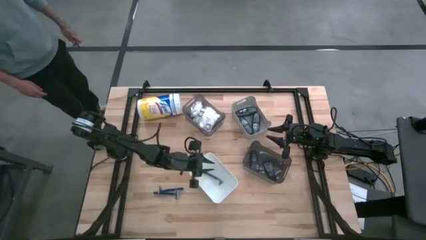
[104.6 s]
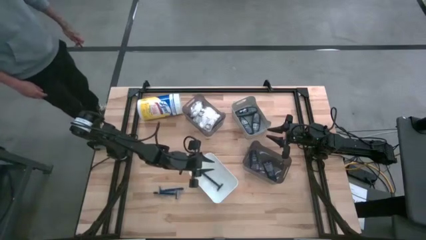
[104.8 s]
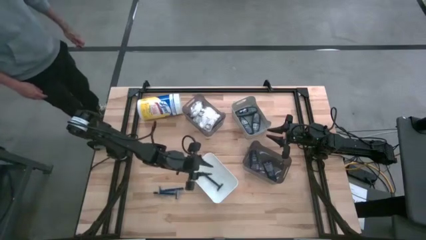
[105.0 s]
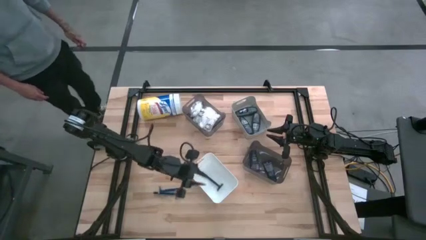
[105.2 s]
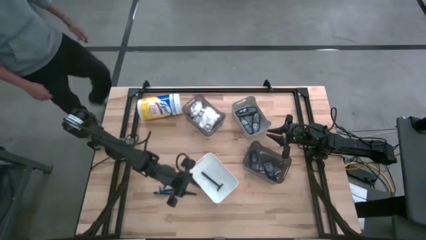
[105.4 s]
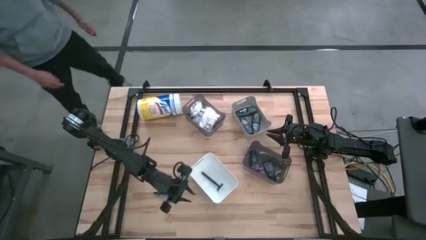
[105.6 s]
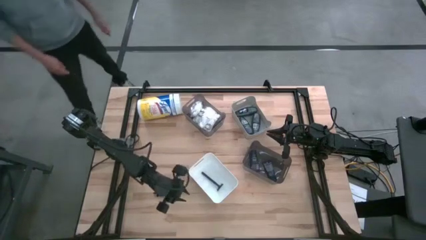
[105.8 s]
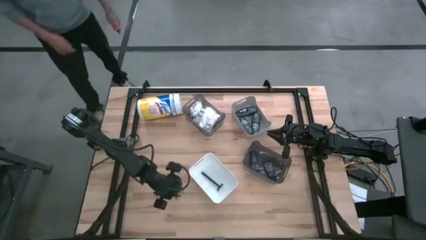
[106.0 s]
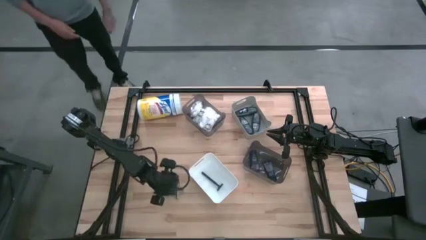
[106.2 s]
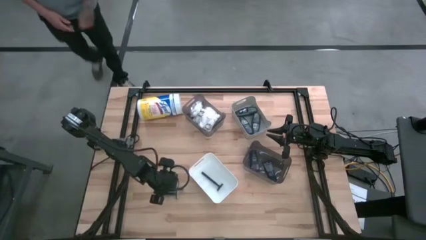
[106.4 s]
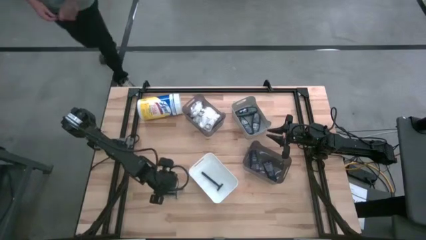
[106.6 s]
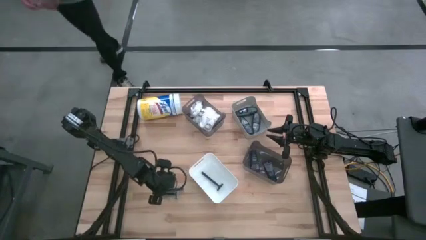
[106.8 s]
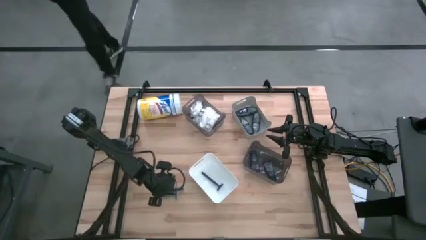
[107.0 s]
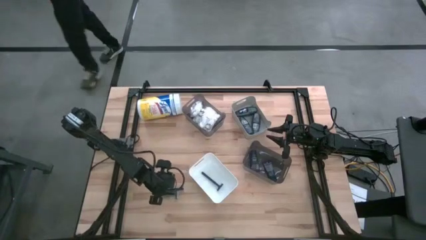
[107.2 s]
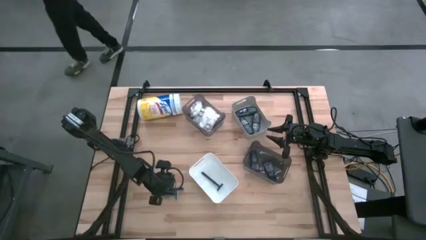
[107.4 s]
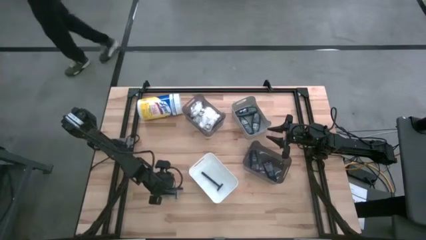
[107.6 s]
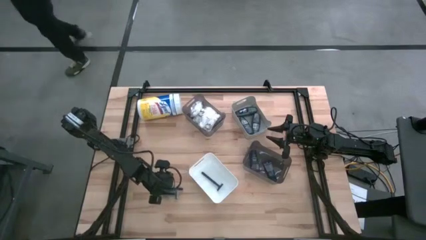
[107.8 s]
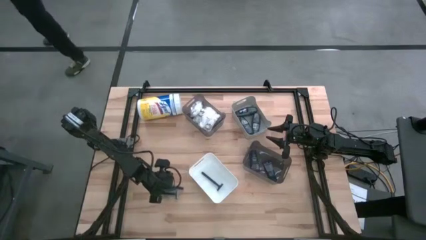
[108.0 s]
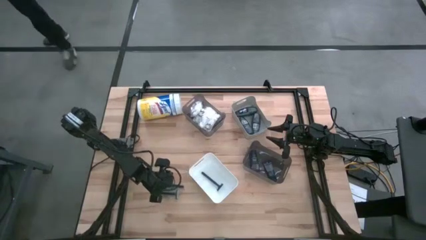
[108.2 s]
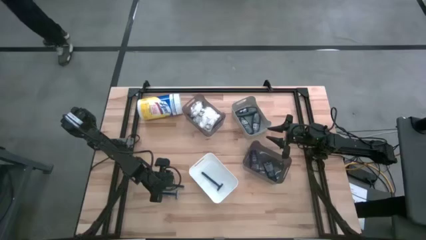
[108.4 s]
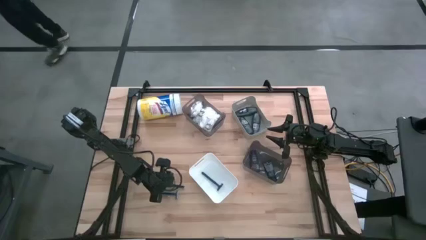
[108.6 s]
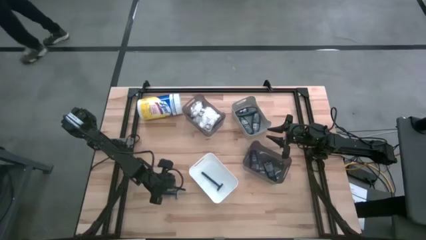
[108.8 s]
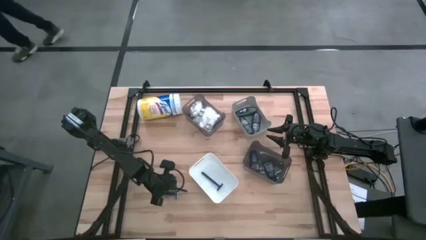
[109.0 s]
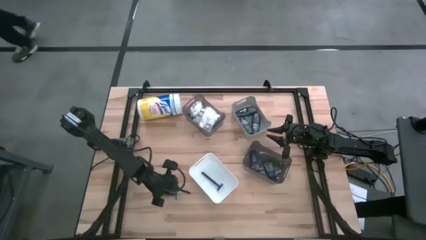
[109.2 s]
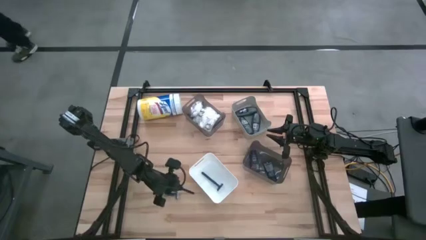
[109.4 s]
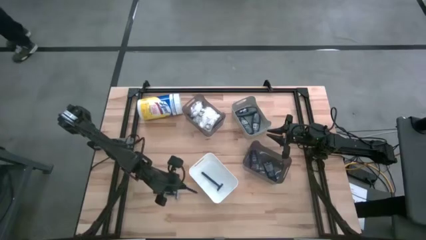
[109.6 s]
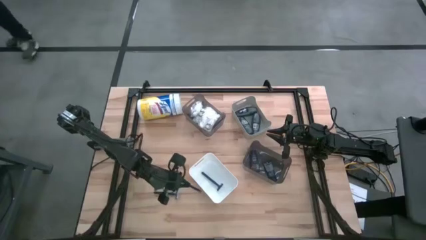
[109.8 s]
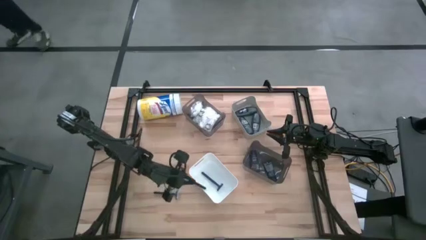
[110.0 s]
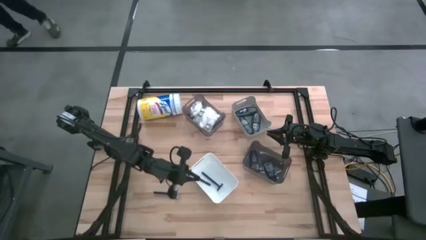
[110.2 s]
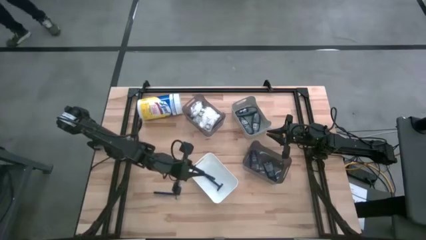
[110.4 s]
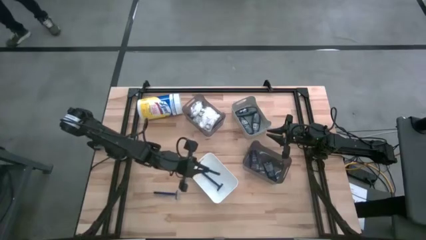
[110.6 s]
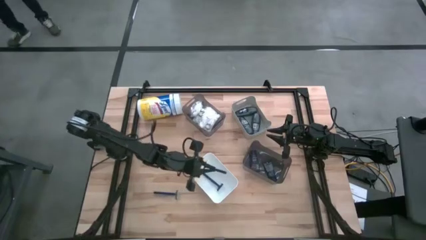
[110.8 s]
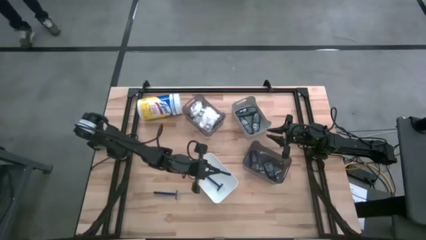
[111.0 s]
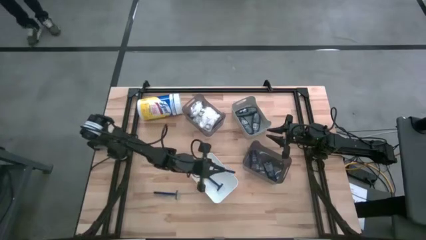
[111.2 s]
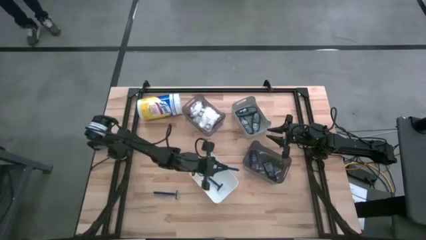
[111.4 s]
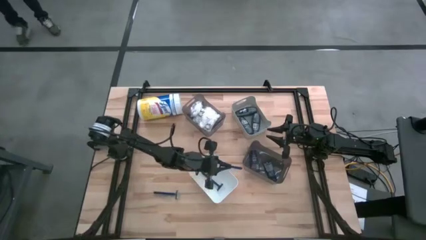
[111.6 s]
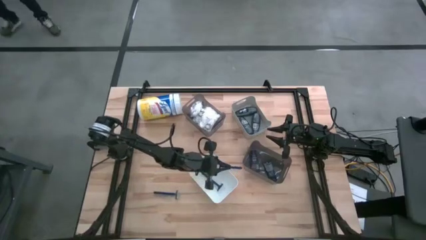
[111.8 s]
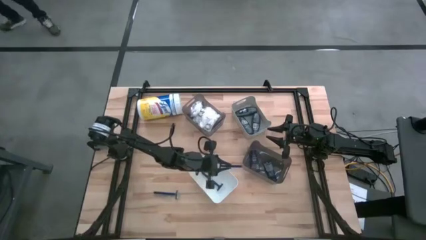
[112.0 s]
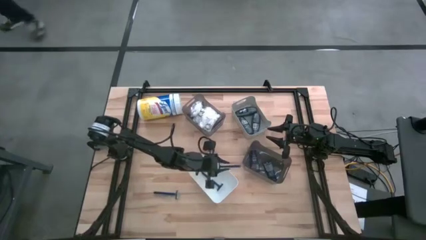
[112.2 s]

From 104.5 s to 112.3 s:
Task: Pick & Place Travel size toiletries
Put the blue razor into the white bin

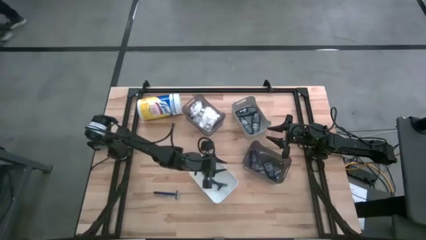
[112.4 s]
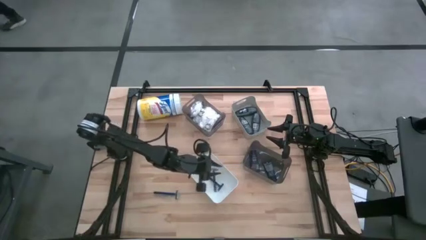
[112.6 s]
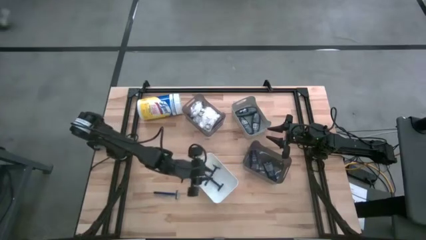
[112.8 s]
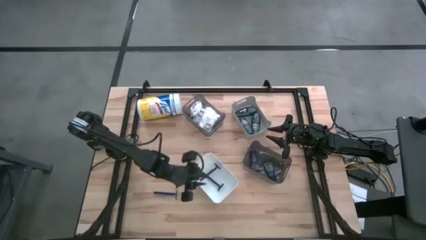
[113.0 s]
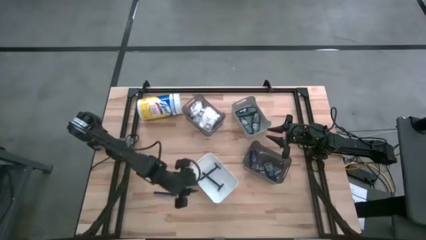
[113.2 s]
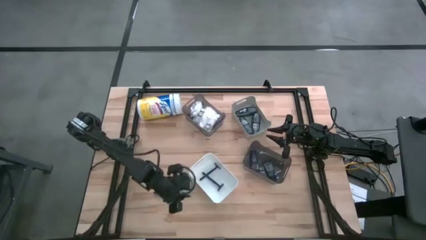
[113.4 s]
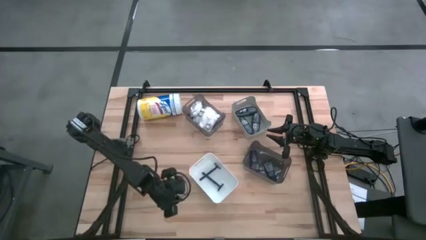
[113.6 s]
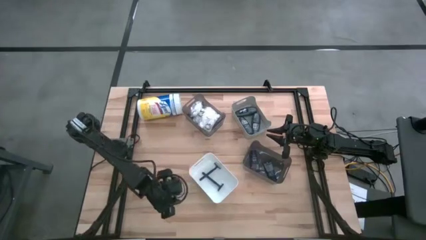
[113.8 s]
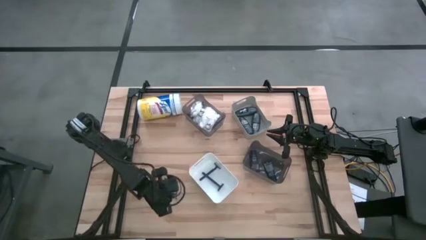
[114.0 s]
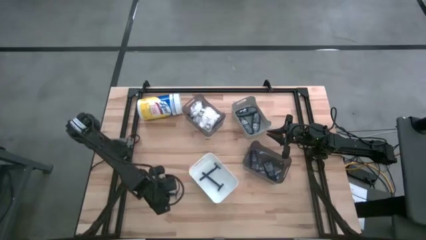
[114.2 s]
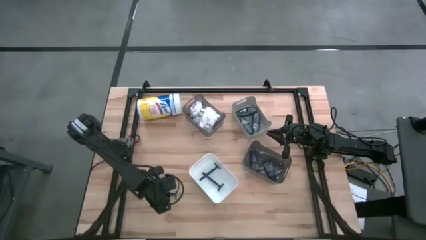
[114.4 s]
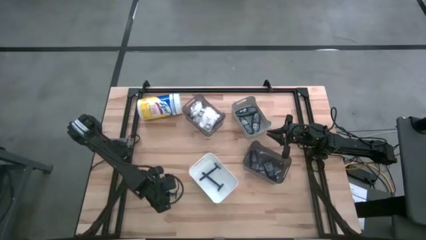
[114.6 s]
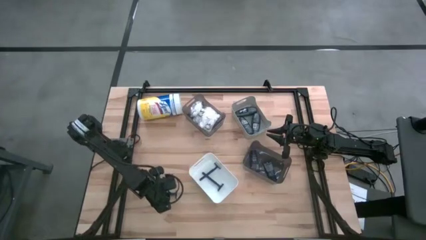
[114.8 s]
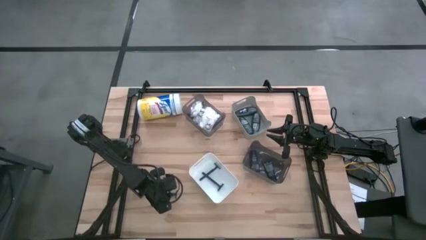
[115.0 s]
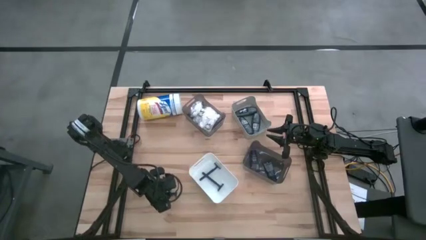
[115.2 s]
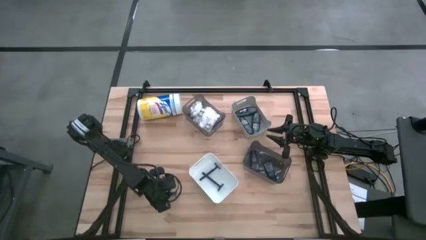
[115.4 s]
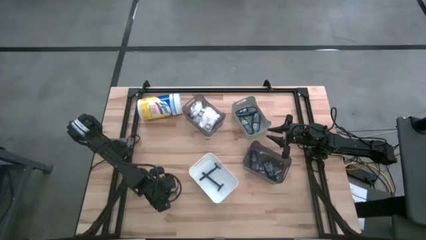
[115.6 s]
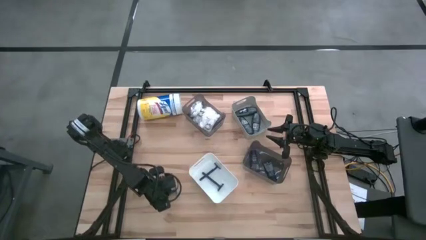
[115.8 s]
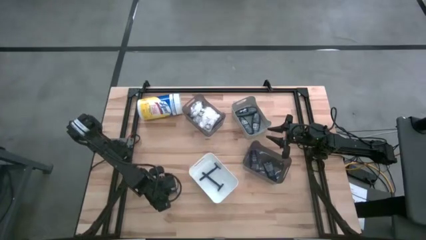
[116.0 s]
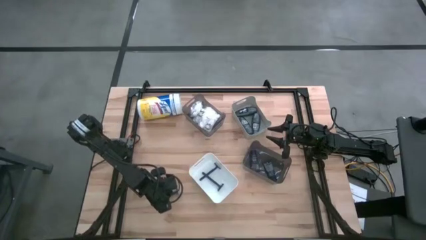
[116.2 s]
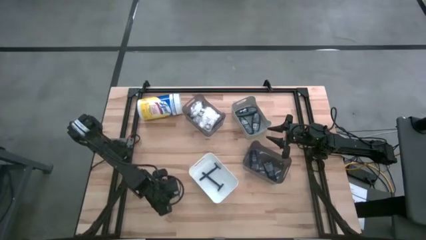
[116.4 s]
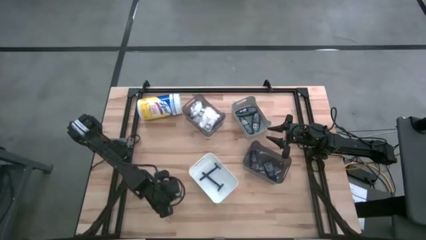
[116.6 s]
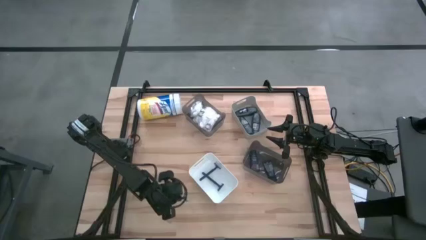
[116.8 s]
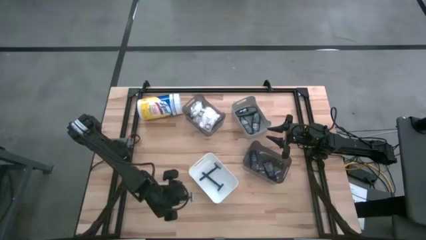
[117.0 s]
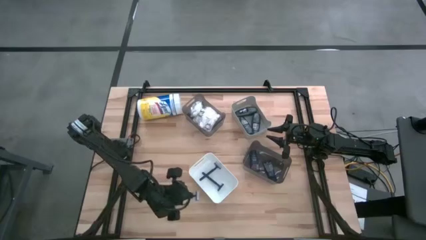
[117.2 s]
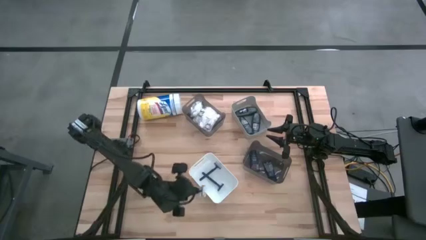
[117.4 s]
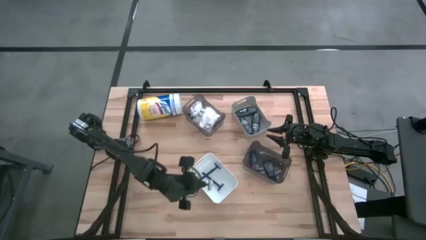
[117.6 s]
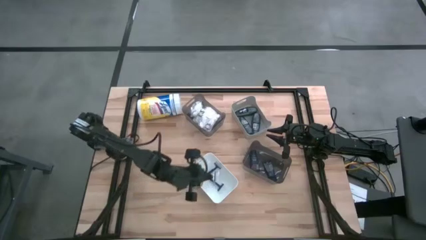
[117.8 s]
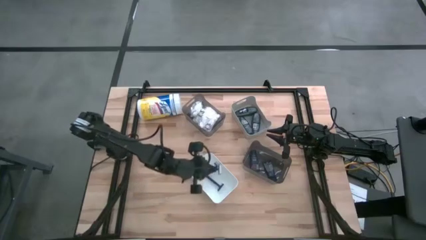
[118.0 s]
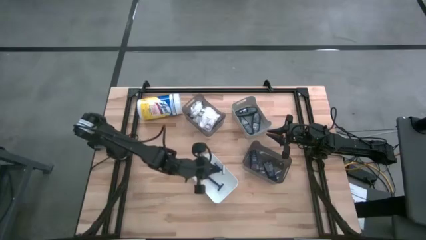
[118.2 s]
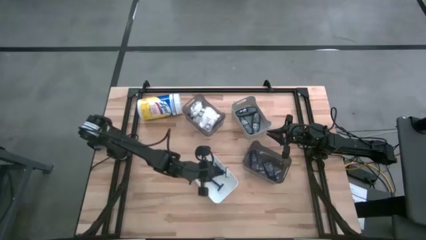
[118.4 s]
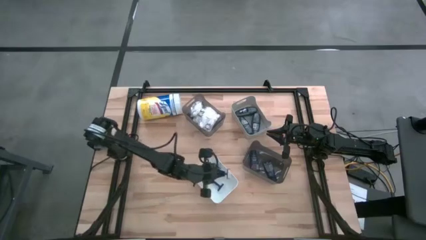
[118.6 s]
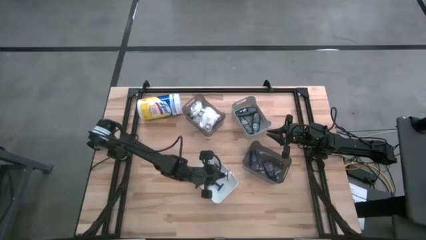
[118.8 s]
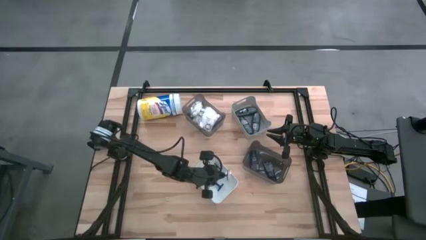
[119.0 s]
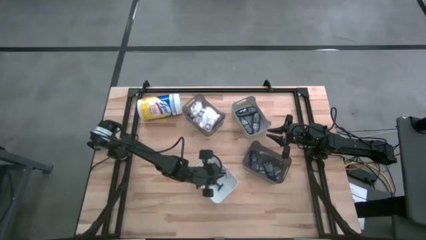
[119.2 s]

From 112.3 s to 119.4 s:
Put the blue razor into the white bin

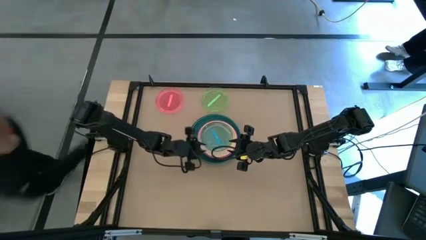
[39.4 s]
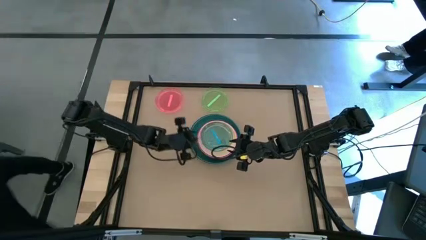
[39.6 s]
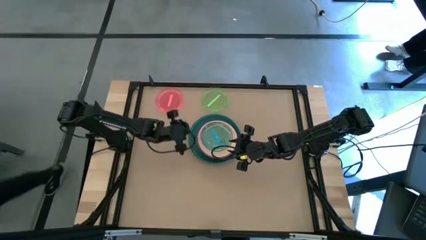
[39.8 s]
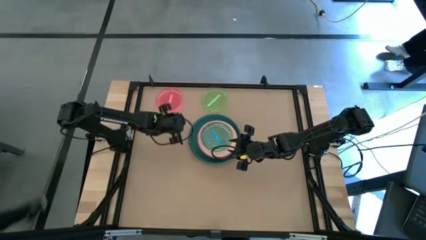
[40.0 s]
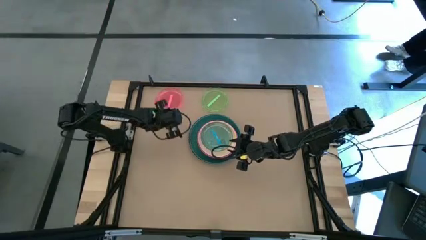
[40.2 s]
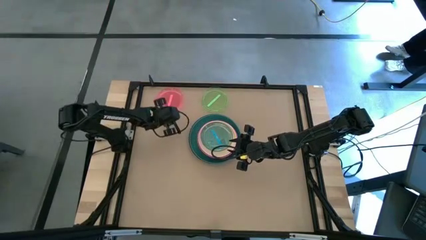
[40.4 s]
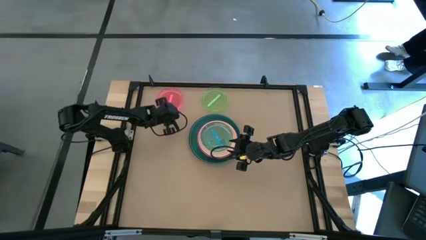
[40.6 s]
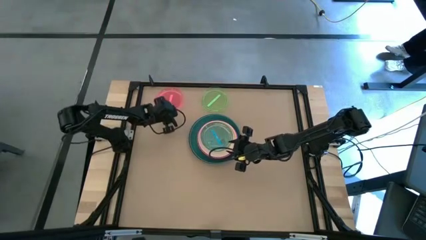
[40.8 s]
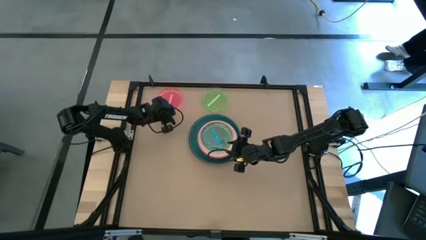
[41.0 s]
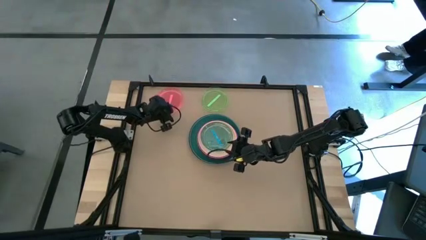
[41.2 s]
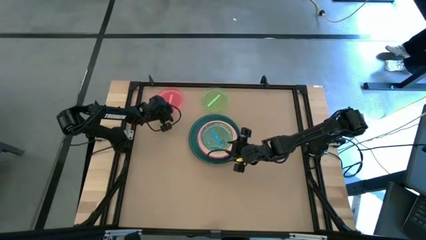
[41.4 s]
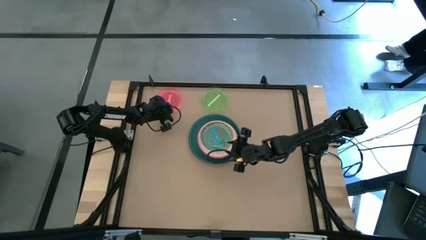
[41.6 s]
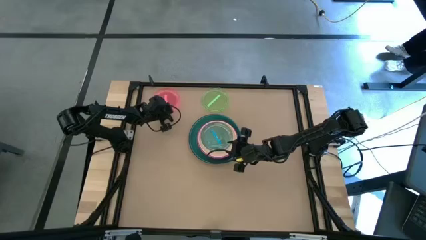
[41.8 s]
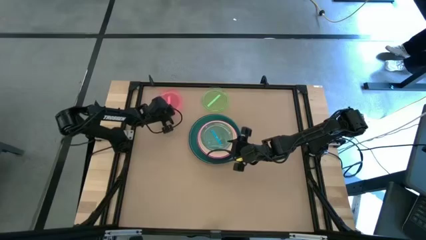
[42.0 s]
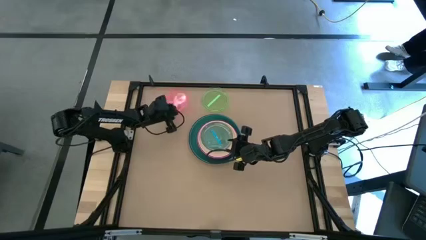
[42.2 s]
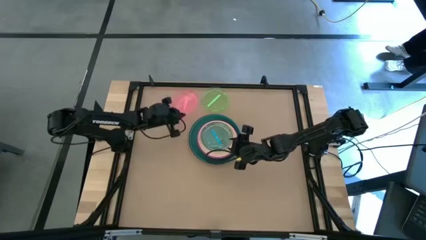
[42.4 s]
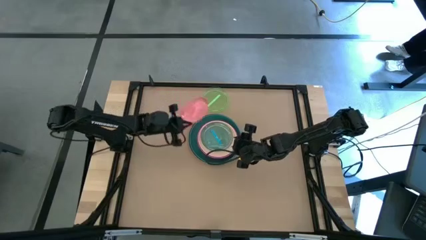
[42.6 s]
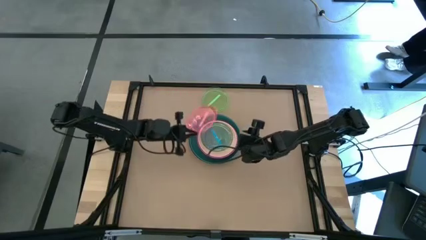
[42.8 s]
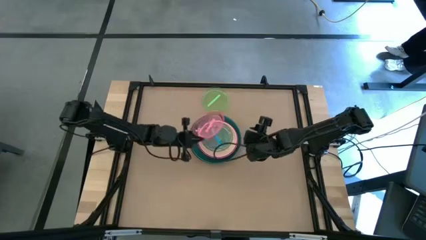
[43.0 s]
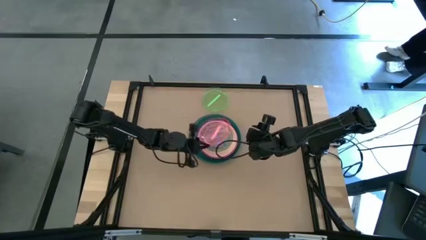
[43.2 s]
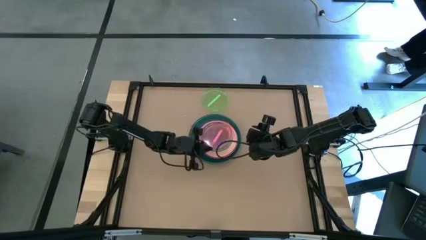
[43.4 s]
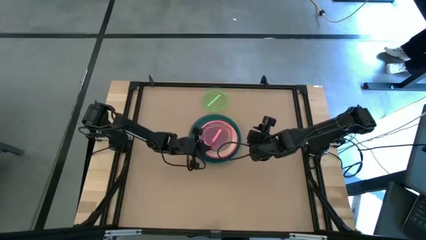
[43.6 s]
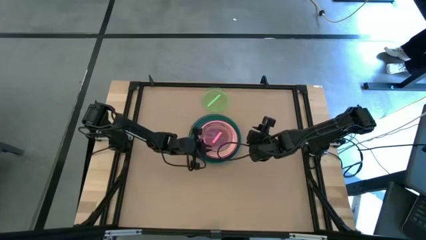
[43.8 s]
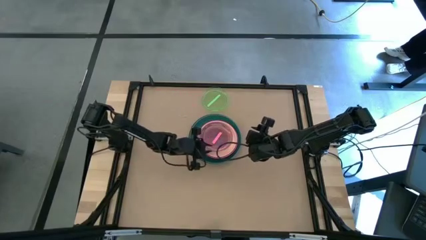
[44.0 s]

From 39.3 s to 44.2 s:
Task: Stack plastic plates
Stack the transparent pink plate on top of the transparent blue plate
